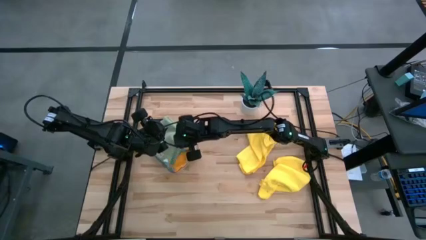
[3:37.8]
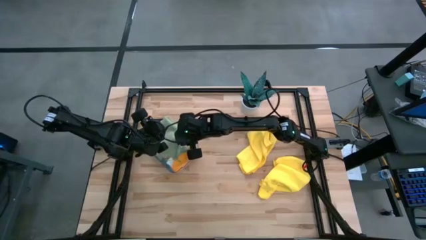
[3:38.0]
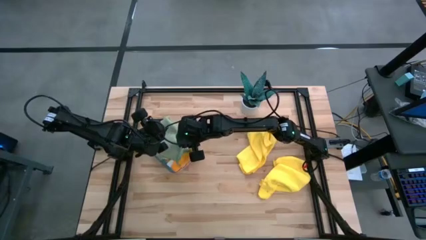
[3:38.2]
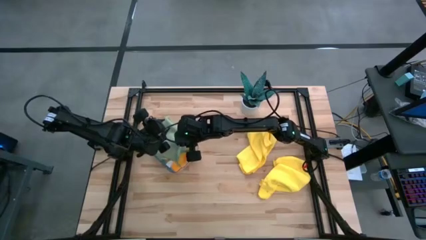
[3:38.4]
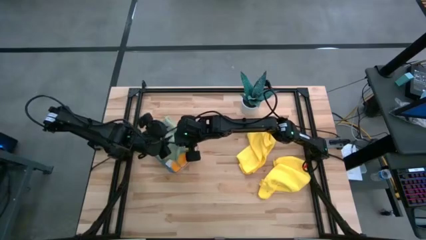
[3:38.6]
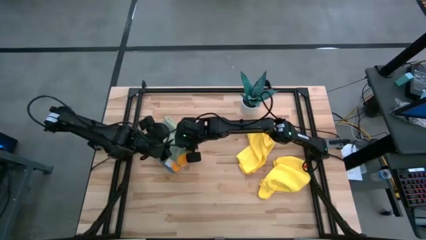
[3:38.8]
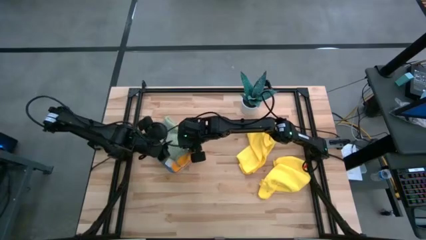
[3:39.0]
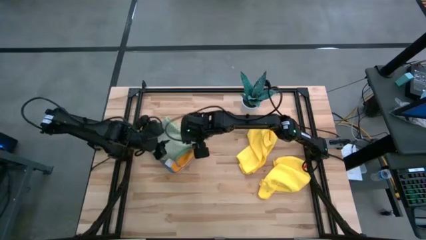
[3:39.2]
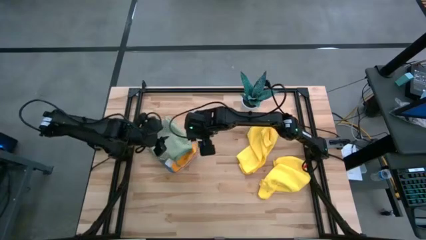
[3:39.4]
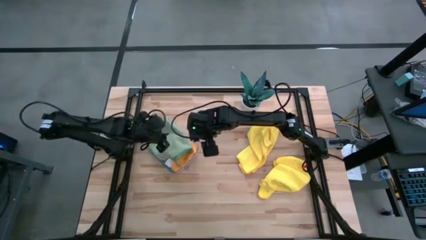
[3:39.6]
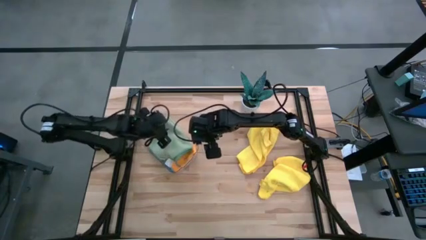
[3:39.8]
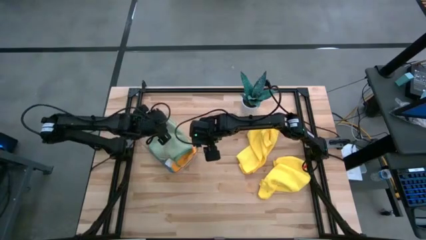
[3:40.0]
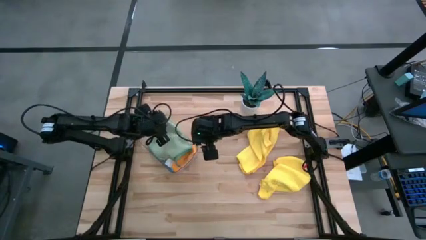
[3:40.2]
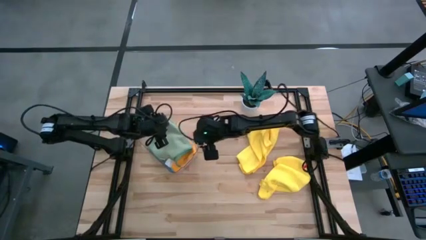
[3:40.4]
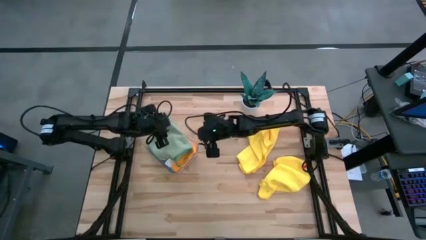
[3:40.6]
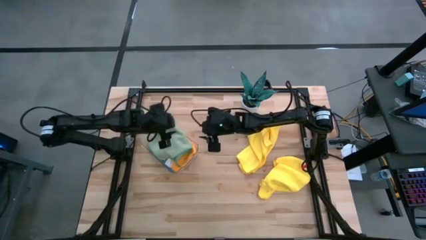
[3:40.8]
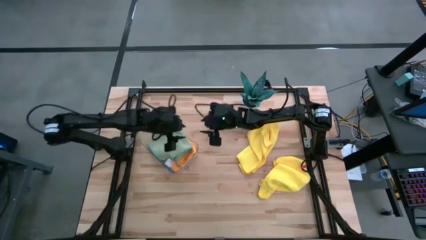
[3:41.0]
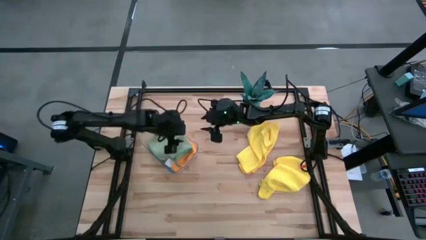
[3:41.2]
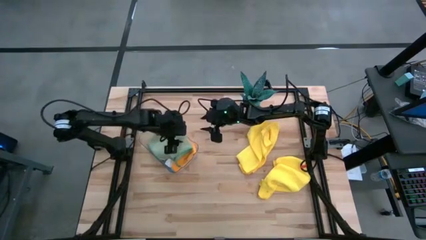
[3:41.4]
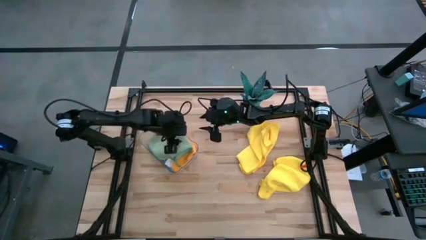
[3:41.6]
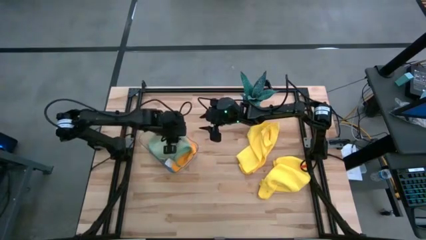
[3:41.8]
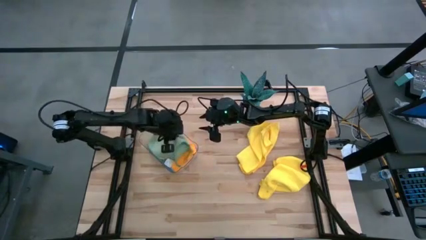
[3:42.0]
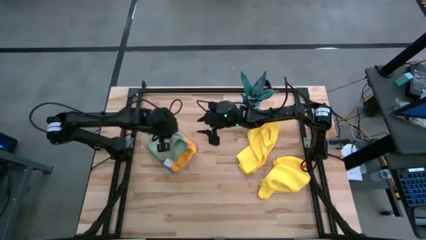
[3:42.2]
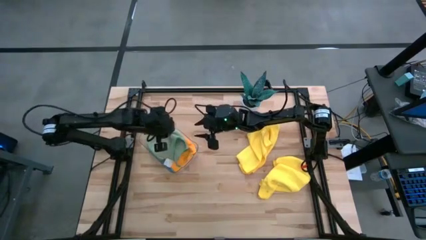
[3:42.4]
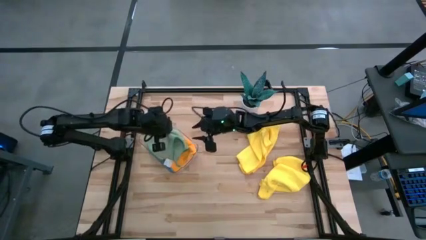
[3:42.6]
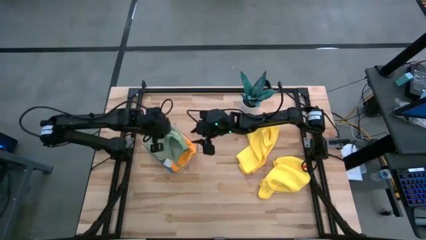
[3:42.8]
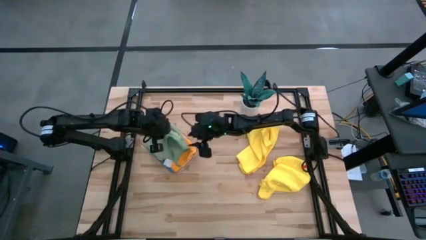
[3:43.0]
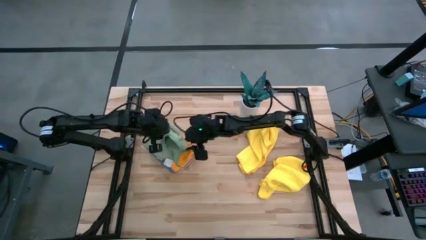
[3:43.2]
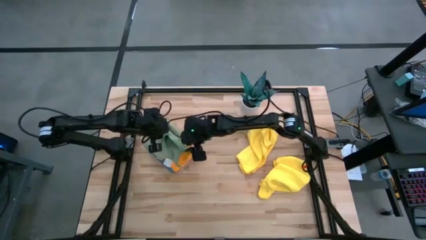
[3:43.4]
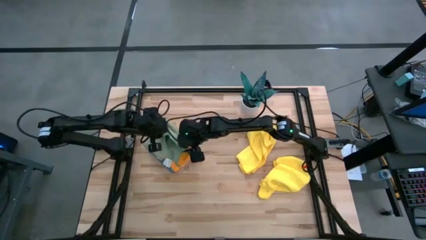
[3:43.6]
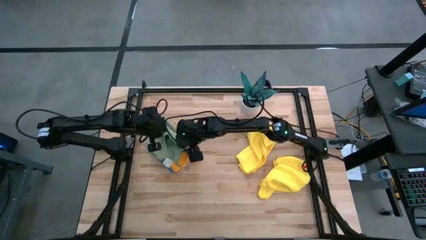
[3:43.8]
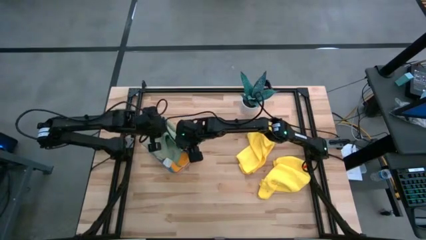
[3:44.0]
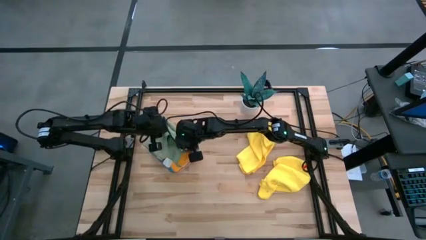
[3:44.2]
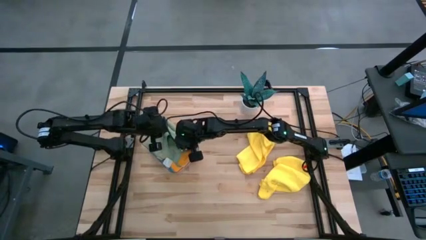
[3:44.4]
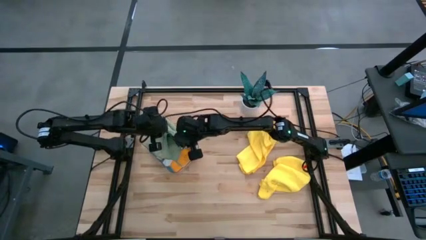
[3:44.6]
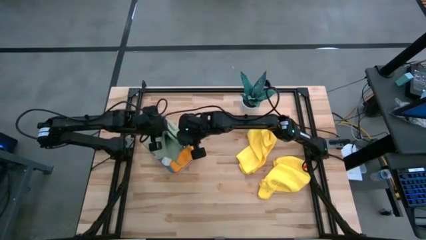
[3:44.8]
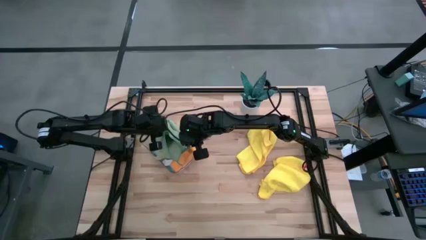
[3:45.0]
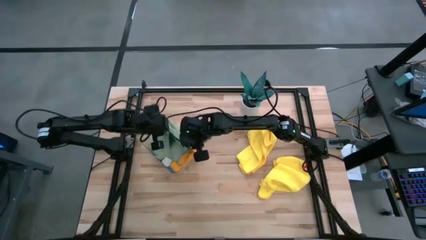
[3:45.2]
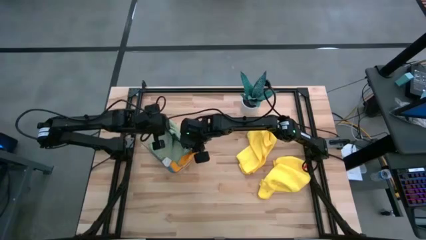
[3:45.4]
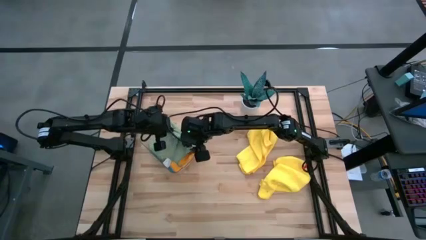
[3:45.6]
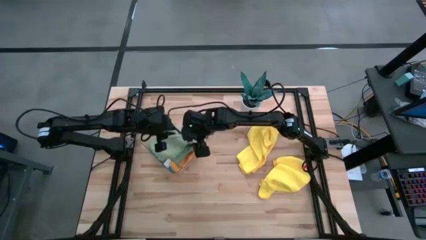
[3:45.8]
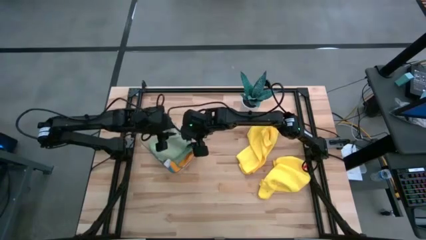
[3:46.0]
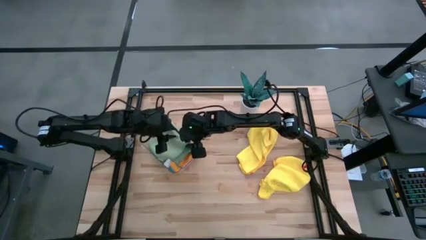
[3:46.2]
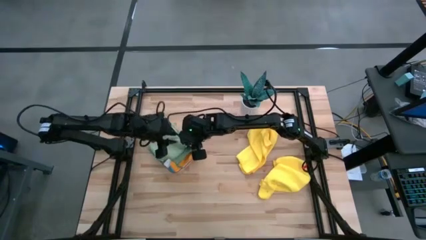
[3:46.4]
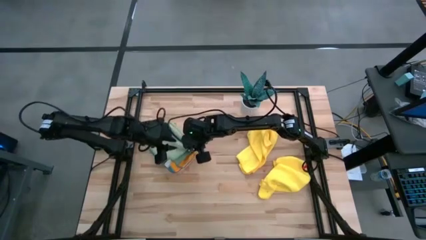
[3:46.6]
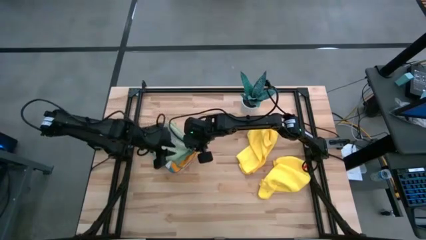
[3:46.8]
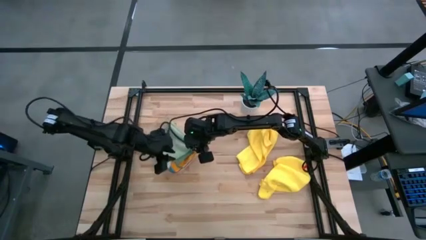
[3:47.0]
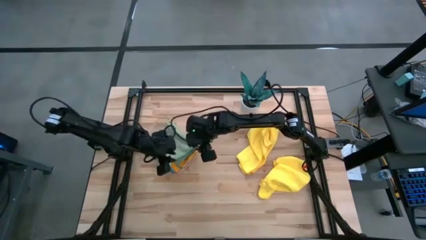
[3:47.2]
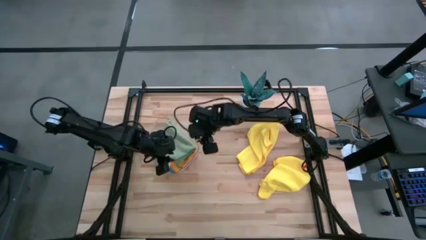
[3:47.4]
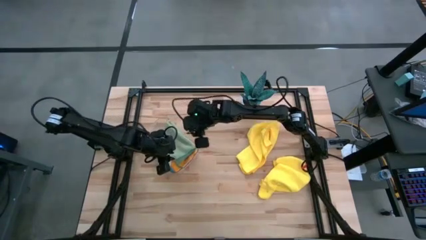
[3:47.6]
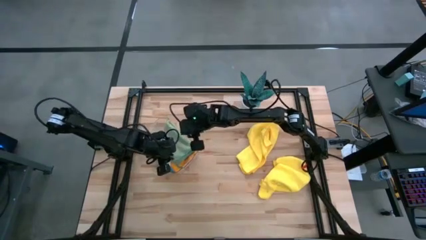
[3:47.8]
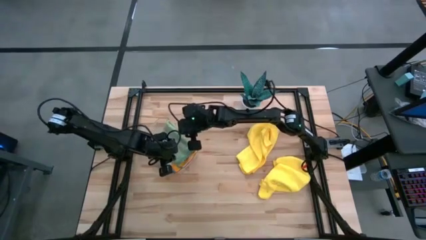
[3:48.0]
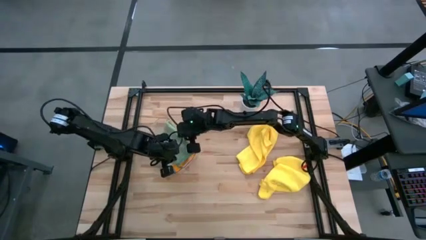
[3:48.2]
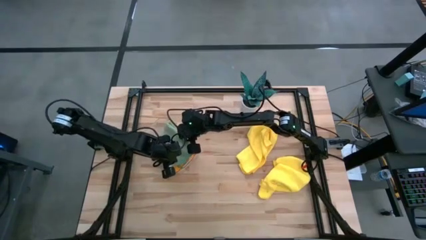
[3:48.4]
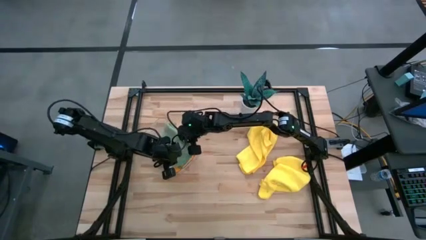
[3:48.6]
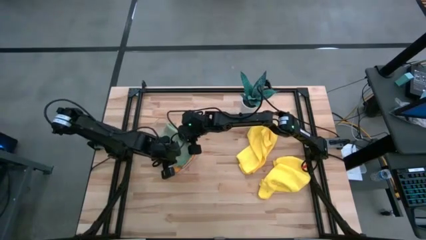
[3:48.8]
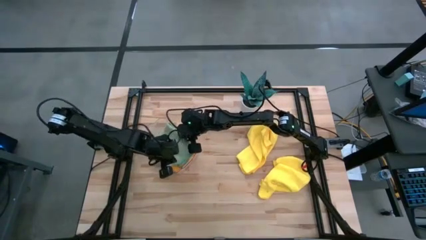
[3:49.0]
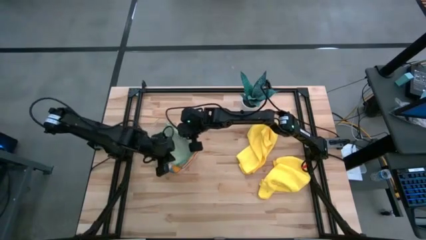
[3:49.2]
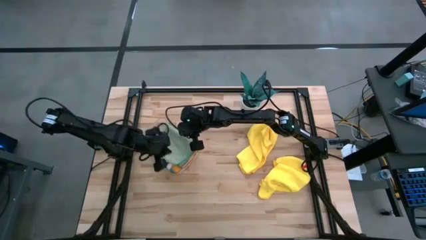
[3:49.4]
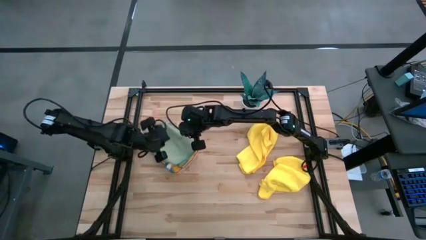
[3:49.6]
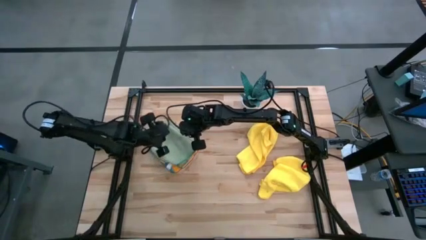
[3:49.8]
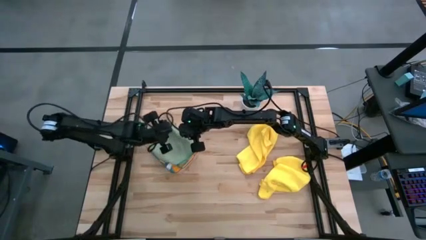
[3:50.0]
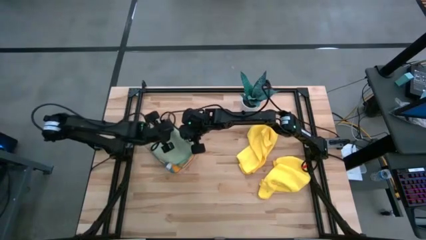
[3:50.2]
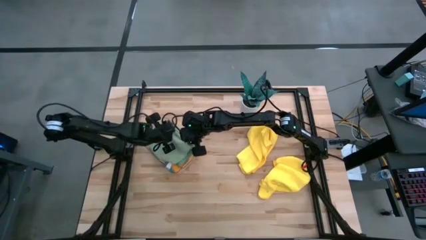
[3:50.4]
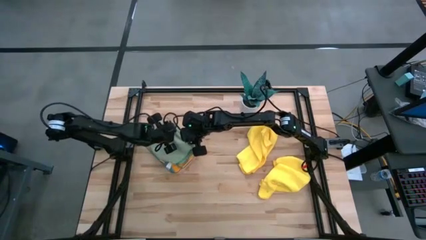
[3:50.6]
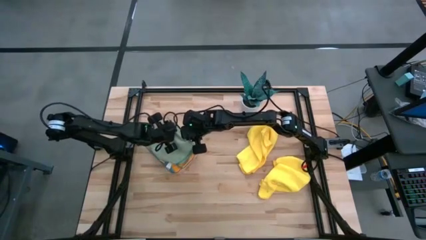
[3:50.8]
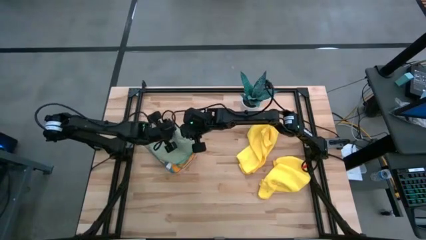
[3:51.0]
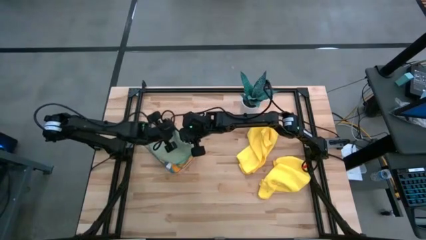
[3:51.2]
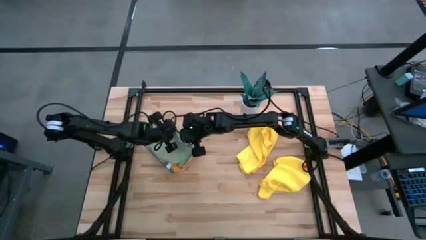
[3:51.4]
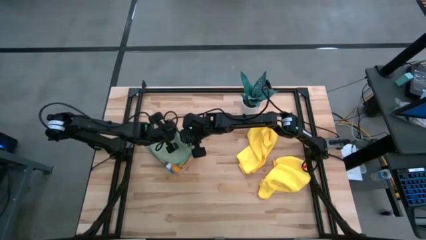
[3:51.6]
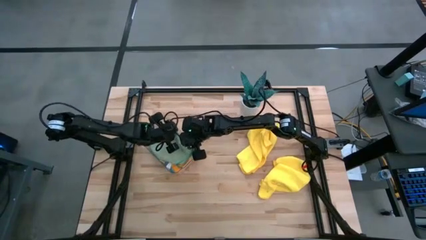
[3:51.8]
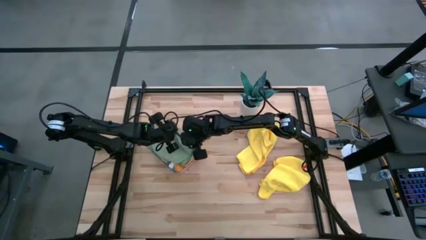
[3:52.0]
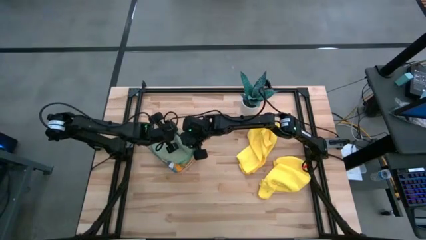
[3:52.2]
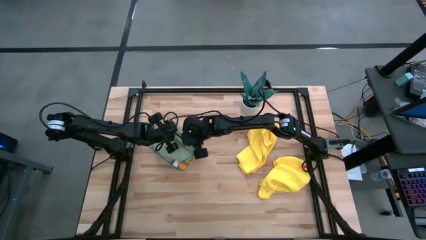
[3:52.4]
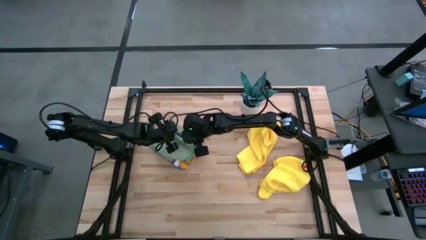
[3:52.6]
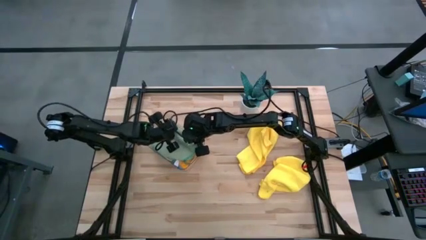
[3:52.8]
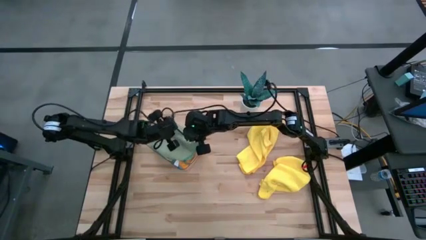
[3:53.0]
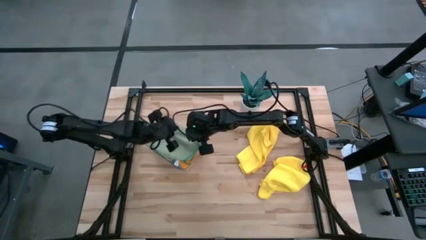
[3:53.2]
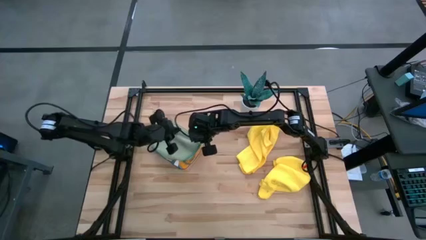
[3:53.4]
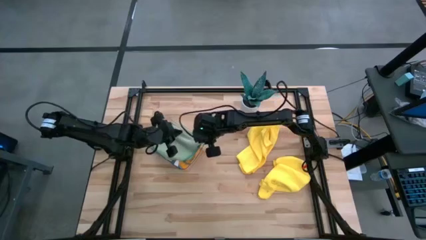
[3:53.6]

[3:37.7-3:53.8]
Task: Fold microfiber towels
Put the green microfiber cloth into the transparent bin
